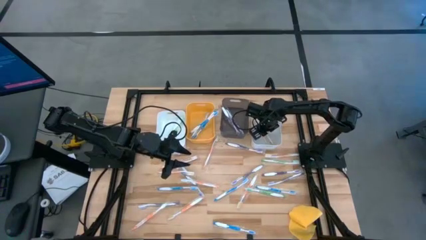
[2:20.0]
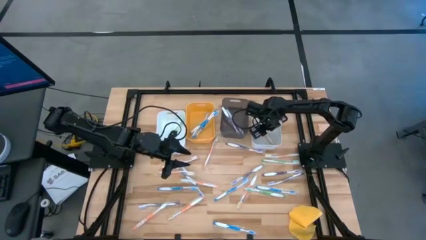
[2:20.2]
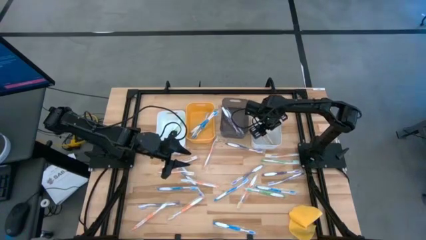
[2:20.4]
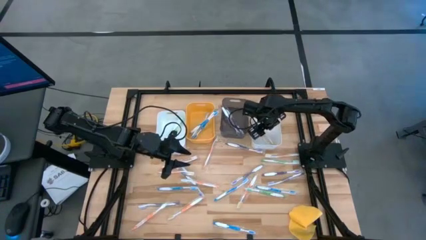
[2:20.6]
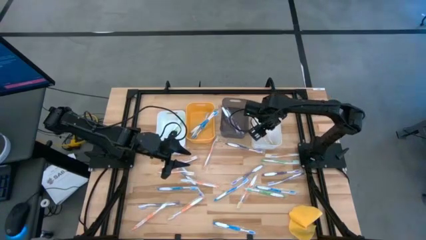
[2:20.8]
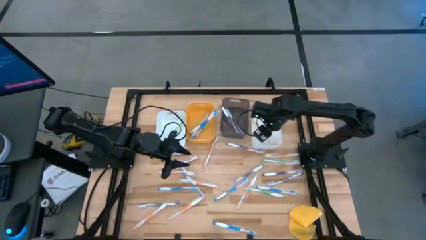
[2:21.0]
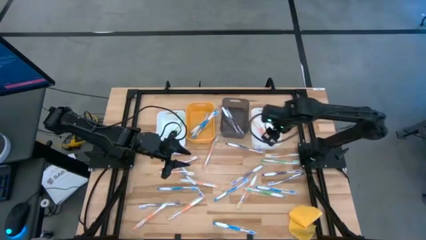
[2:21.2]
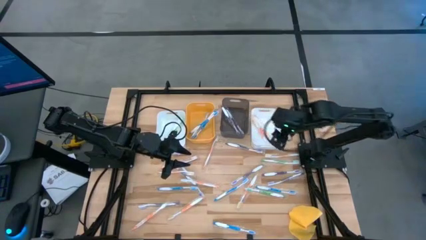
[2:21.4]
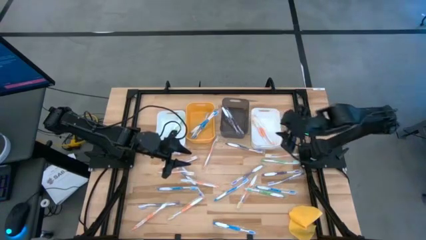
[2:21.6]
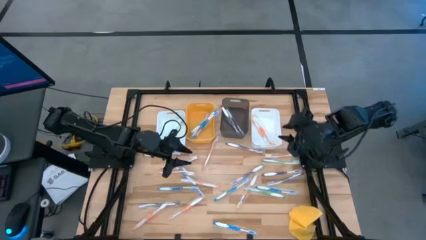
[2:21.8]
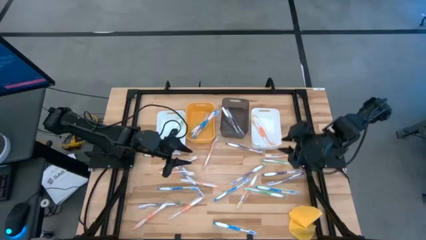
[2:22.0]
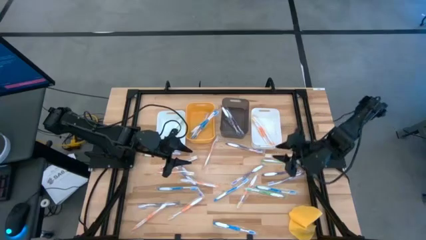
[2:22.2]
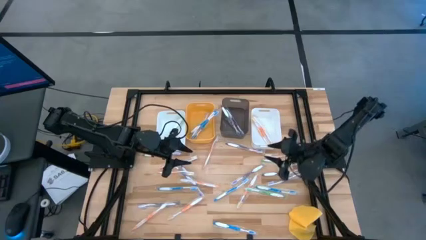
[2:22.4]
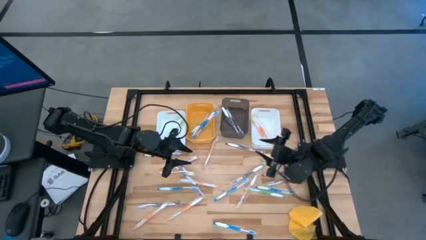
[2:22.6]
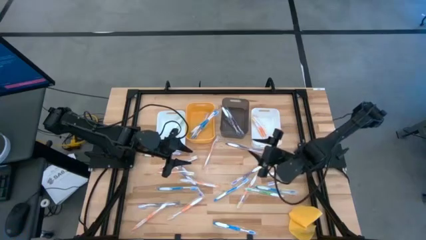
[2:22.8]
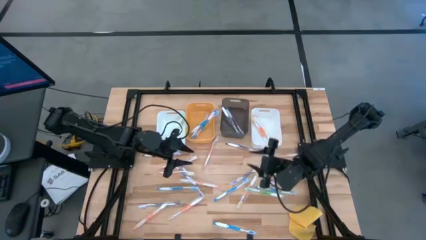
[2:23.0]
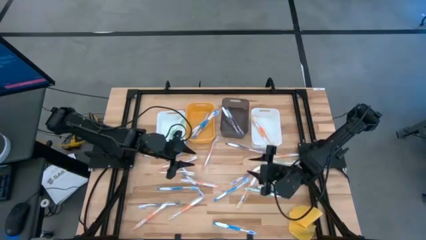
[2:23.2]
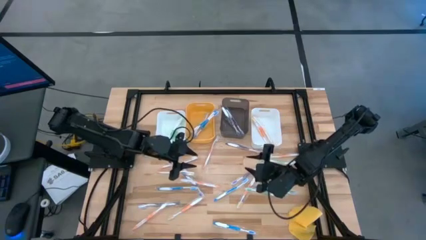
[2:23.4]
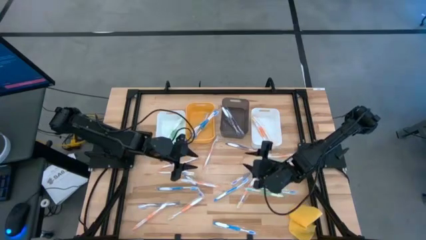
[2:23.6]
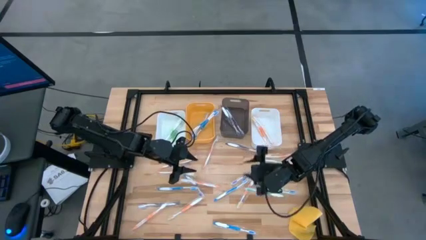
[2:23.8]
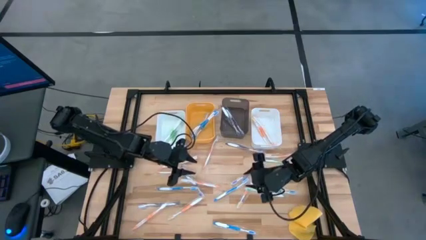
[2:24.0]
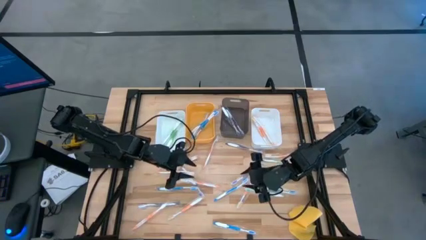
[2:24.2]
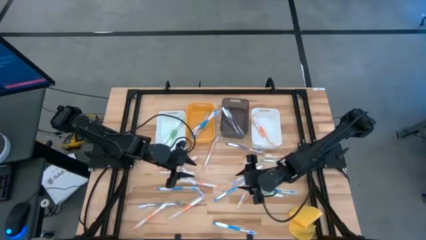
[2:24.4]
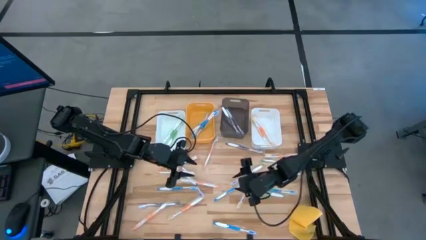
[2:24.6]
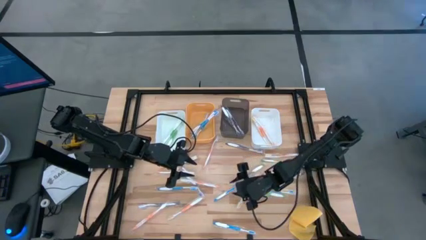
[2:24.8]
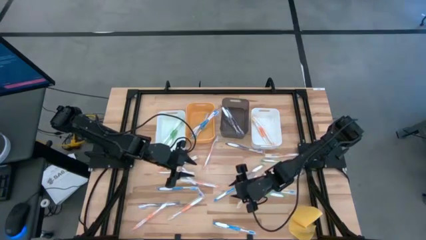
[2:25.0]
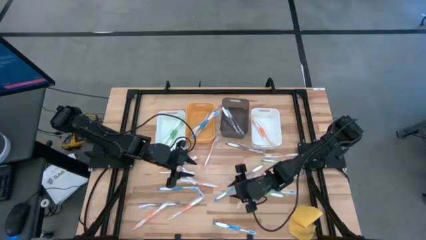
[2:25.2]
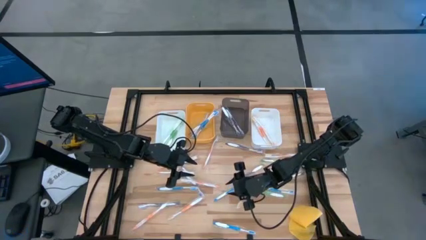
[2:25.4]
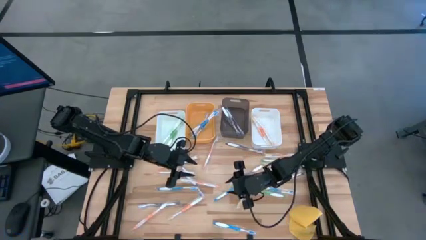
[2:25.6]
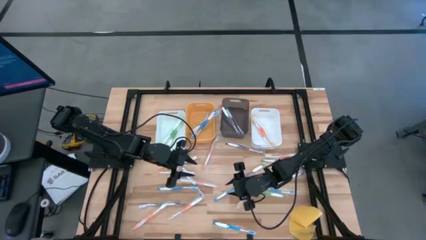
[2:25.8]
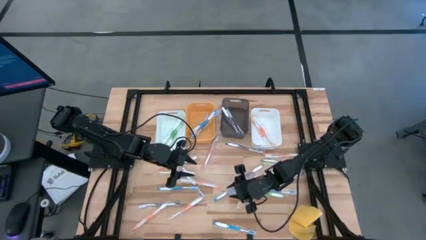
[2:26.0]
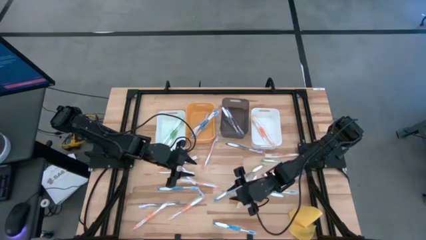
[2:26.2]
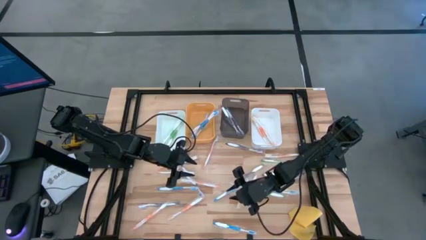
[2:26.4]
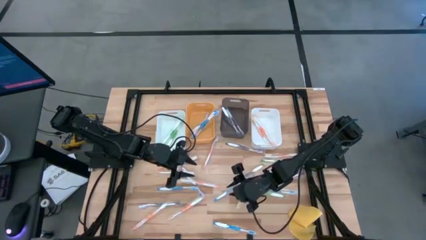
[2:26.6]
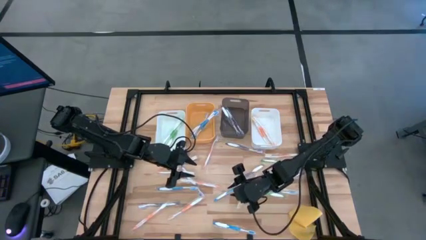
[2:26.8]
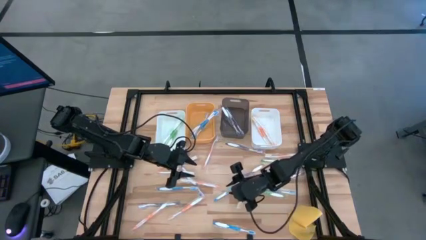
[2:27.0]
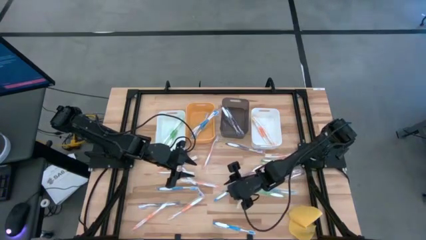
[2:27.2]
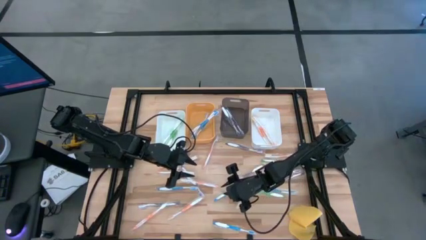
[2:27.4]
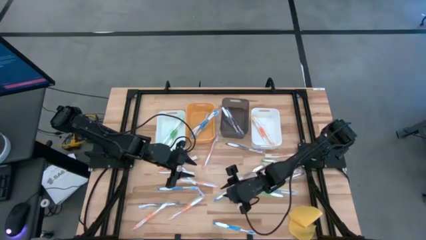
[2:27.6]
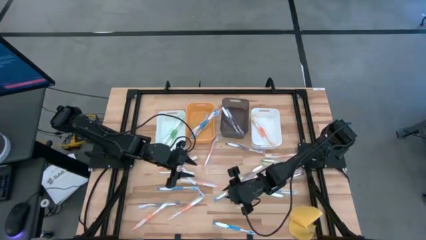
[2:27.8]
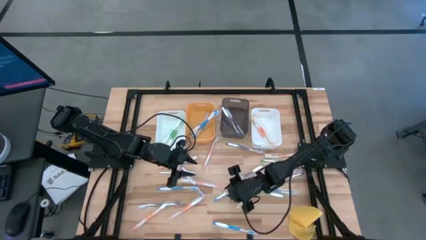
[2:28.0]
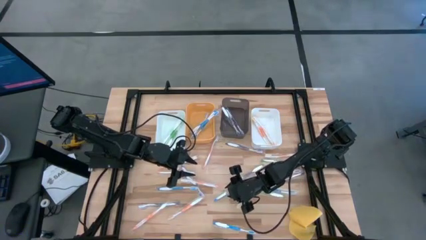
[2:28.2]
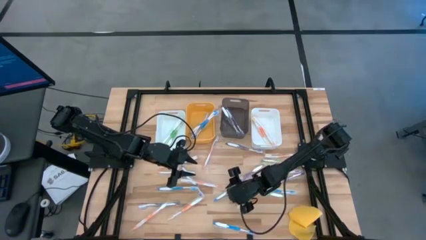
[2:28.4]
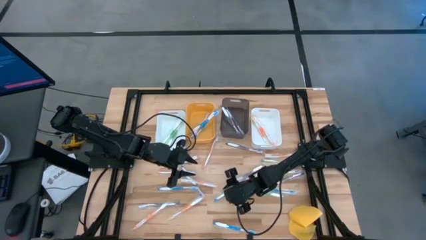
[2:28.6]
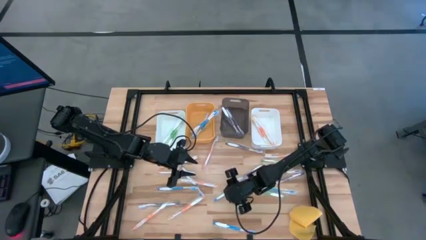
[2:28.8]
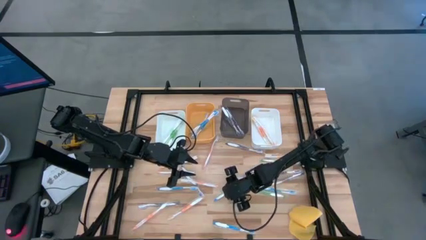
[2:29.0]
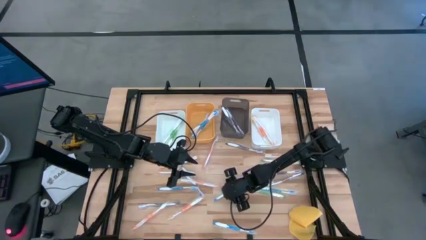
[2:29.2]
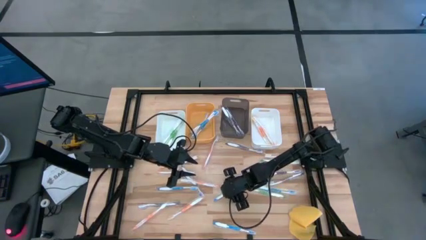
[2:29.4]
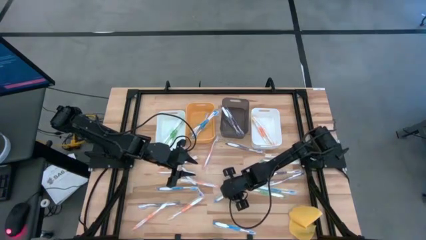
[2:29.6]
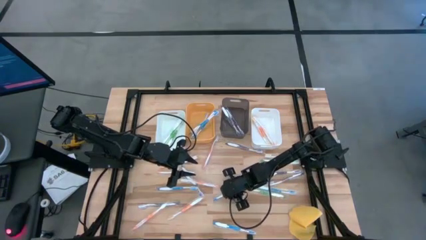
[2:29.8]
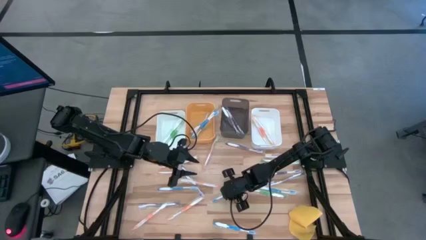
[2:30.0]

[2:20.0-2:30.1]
Task: Pick & Place Toothbrushes
Put the blue toothbrush into the orange bin

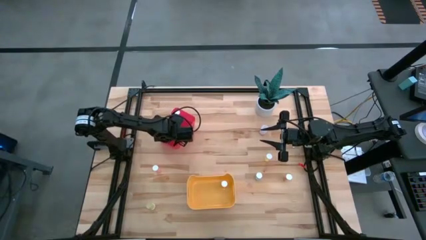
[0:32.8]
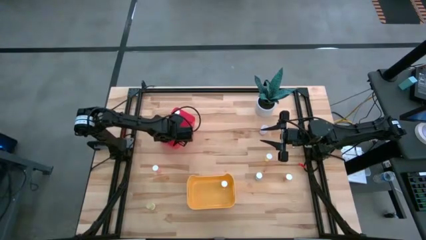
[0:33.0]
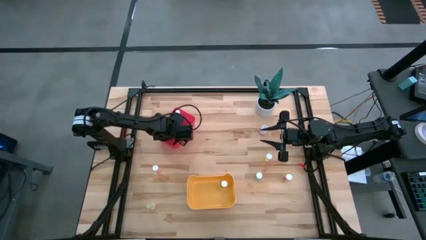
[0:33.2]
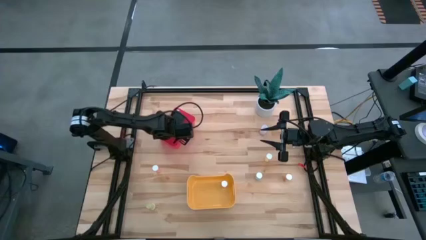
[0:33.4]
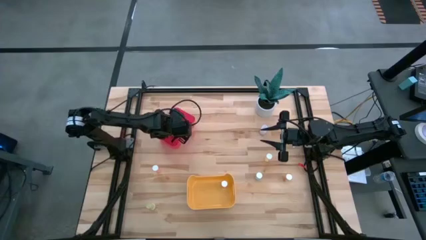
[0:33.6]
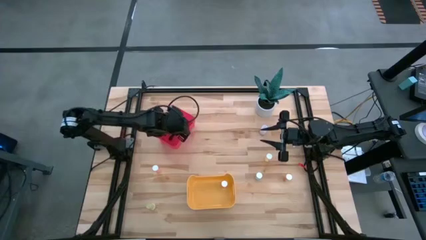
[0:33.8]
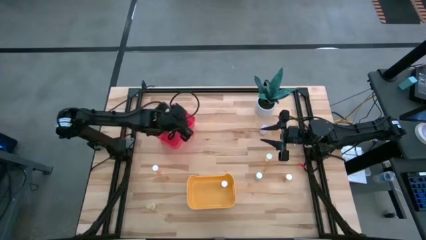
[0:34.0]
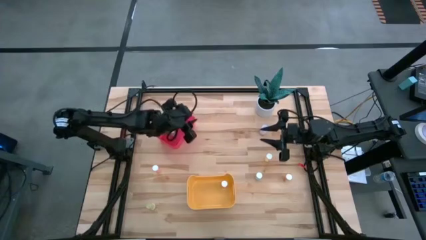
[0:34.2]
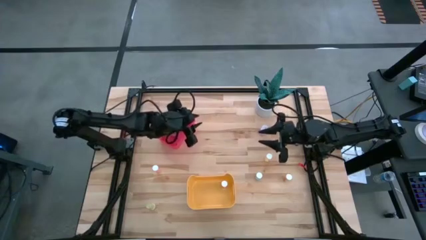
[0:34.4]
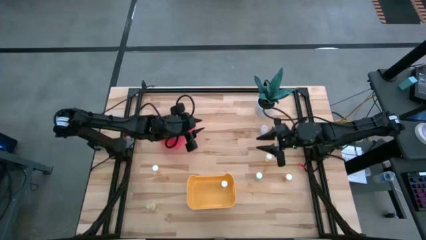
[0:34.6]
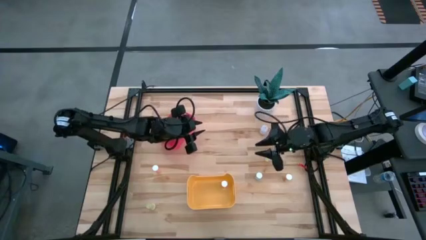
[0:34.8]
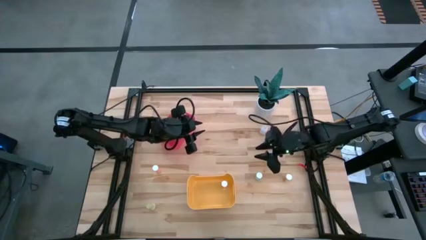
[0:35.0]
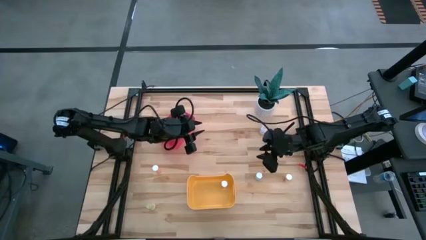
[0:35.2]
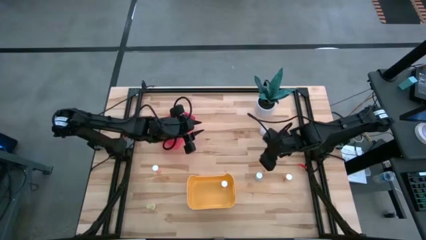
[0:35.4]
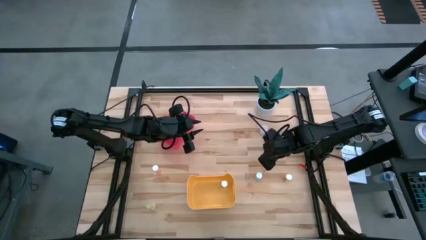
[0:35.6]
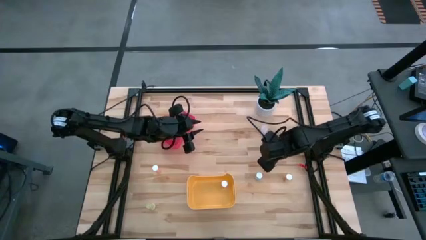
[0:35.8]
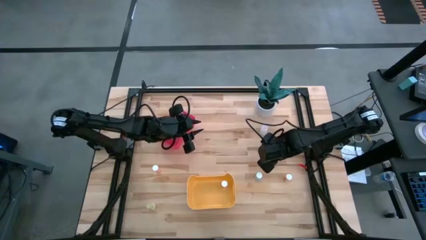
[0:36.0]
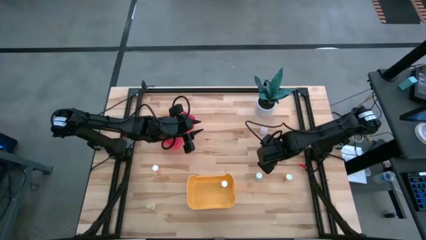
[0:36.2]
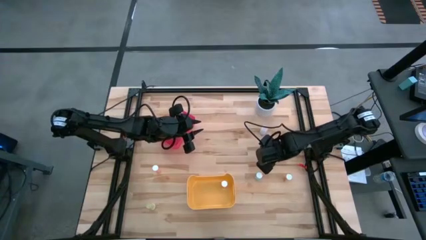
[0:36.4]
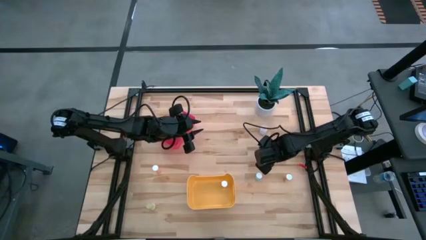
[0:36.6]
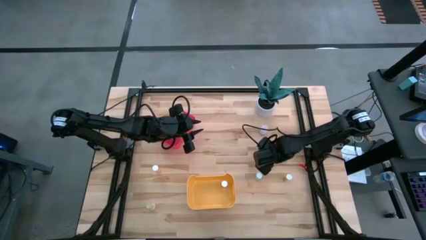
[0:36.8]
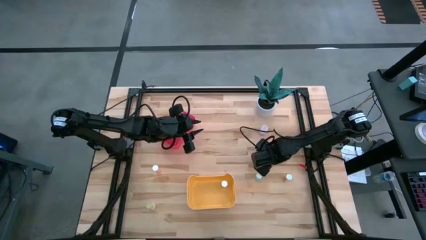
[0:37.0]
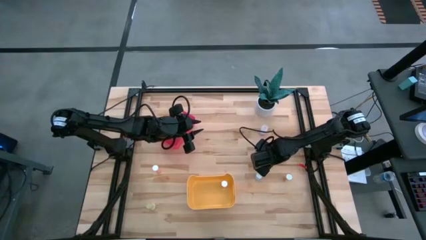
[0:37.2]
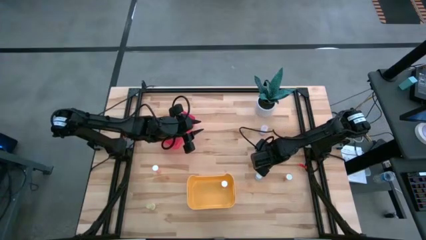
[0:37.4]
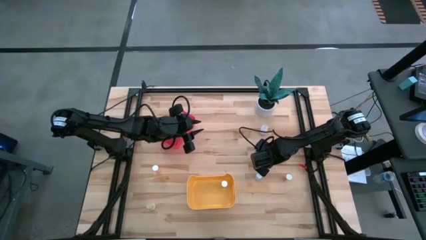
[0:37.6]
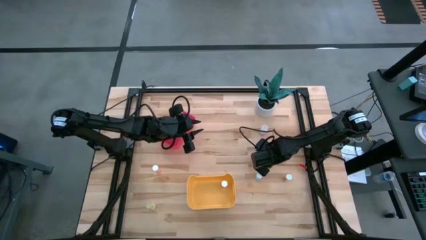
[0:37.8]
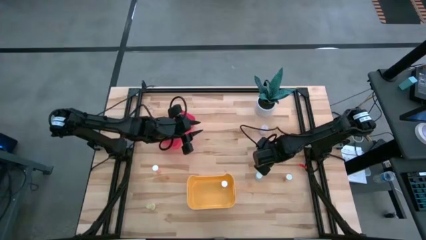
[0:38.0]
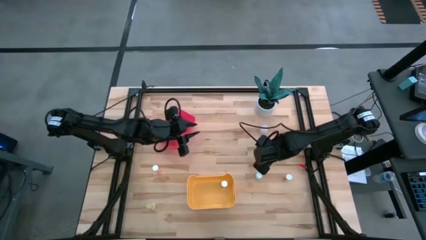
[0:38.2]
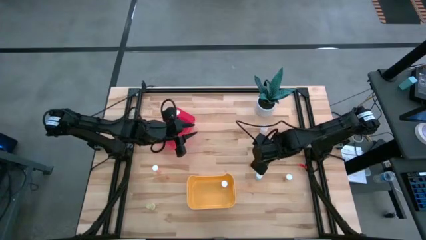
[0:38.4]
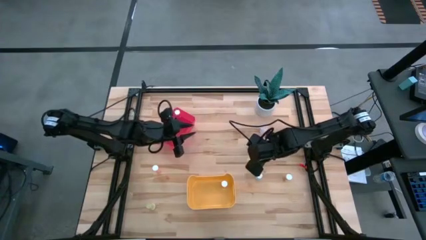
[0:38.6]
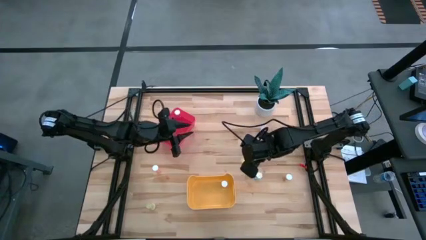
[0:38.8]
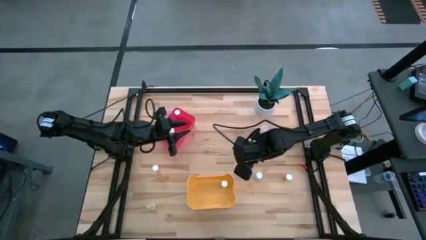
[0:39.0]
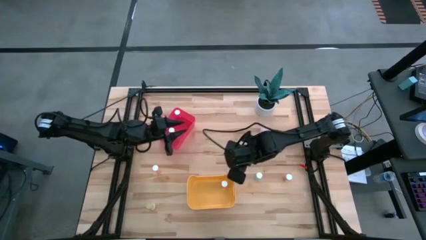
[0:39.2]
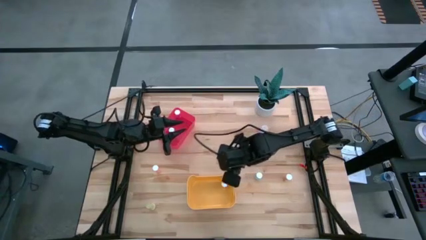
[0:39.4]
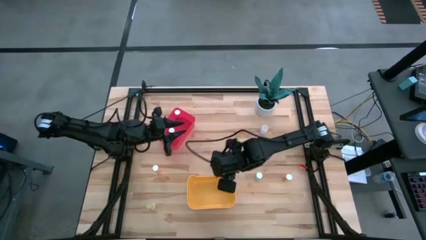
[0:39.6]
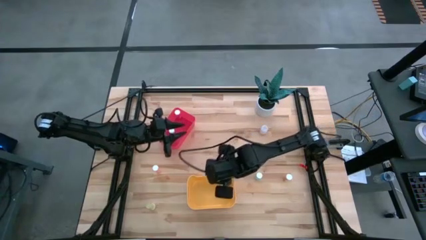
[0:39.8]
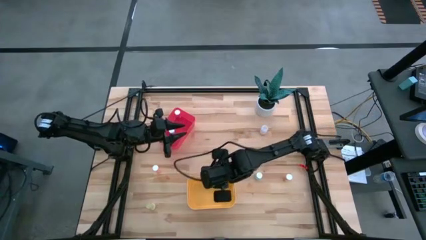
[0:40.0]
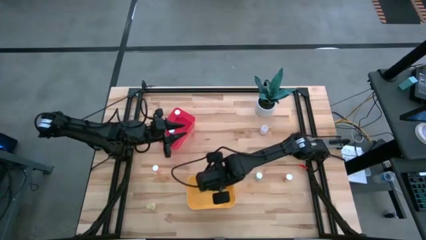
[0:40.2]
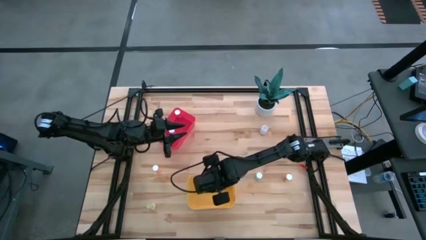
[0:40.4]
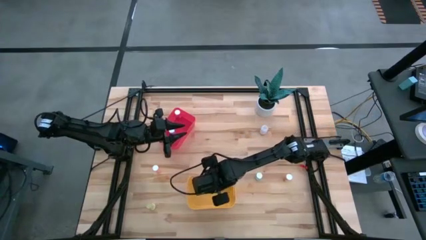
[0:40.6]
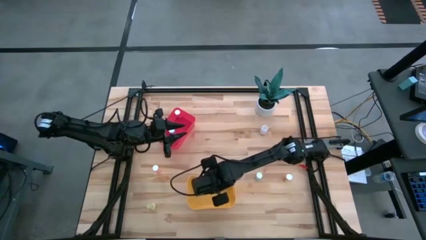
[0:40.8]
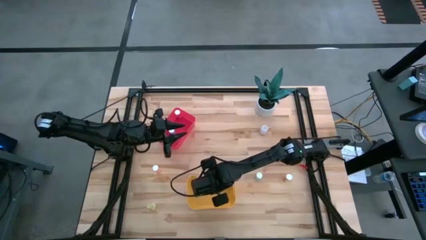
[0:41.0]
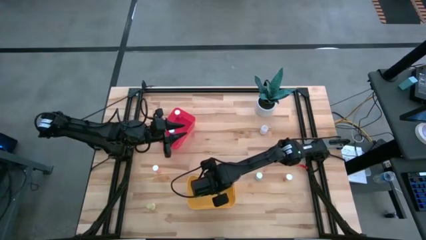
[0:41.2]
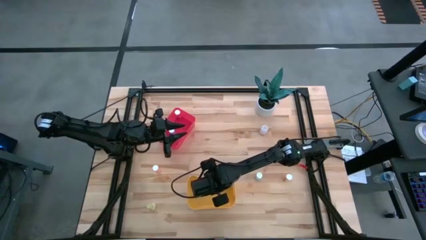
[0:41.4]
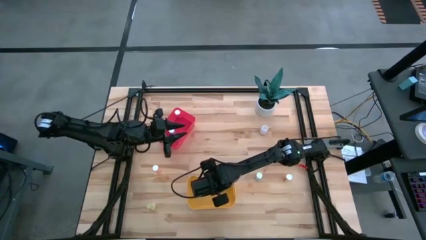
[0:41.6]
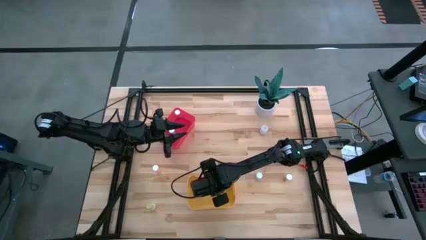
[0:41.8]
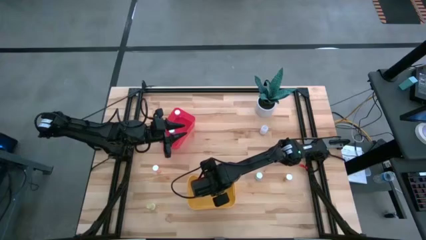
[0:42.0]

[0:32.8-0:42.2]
Task: Pick and place medicine bottles into bin by pill shape (circle, oval)
Put the yellow tablet bottle into the yellow bin
